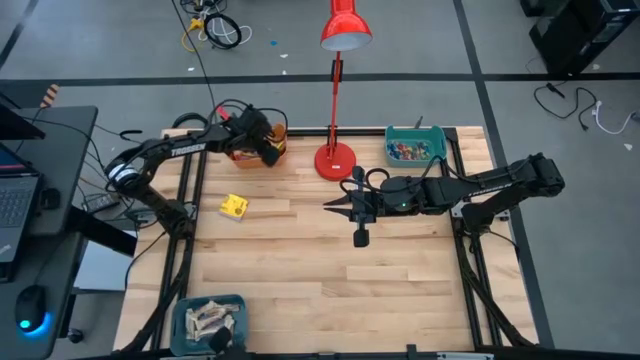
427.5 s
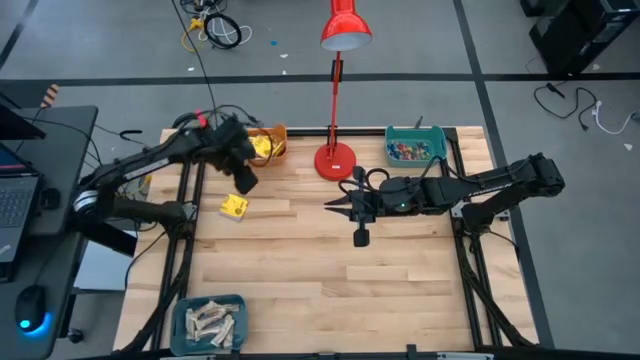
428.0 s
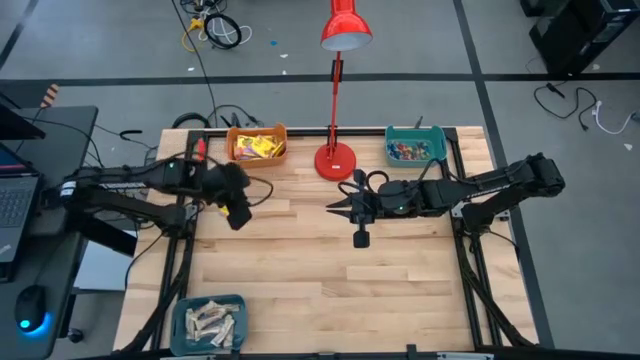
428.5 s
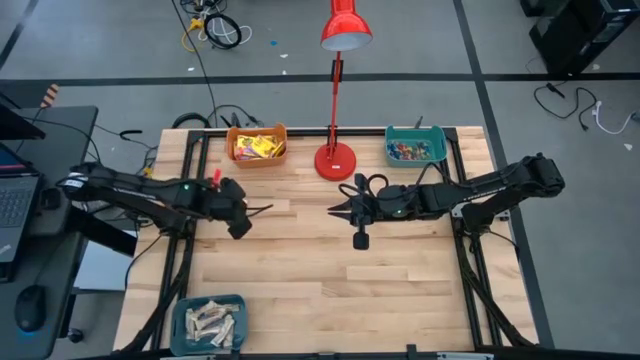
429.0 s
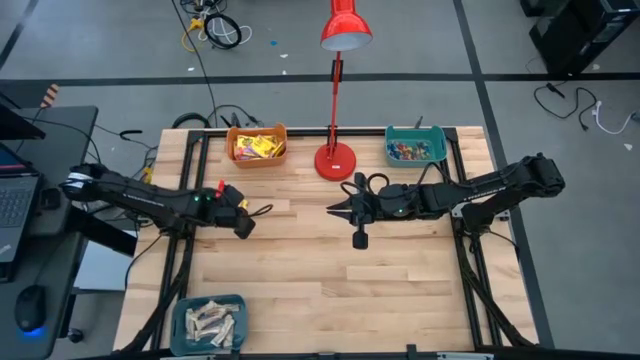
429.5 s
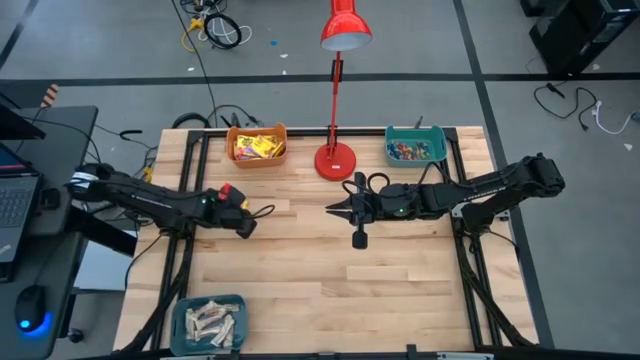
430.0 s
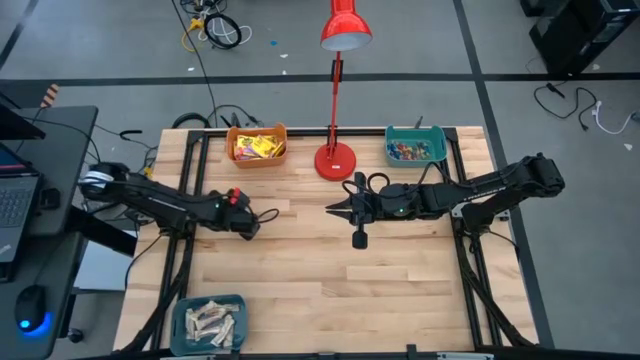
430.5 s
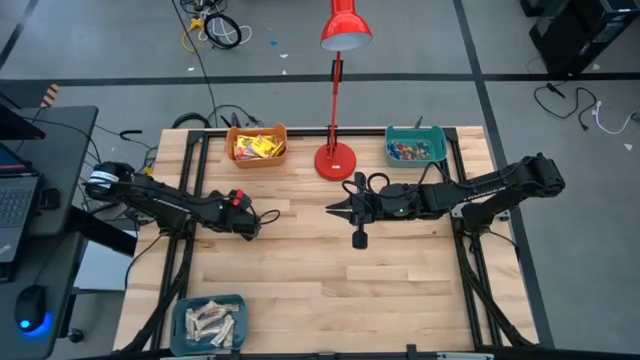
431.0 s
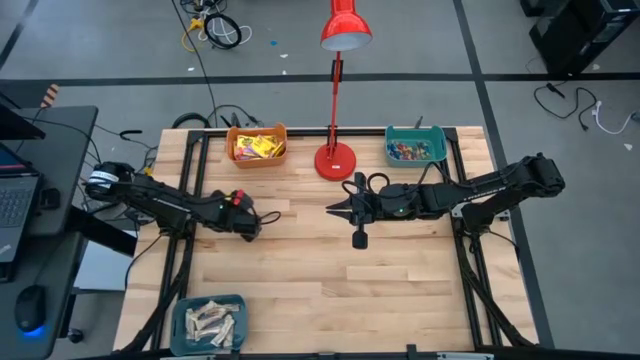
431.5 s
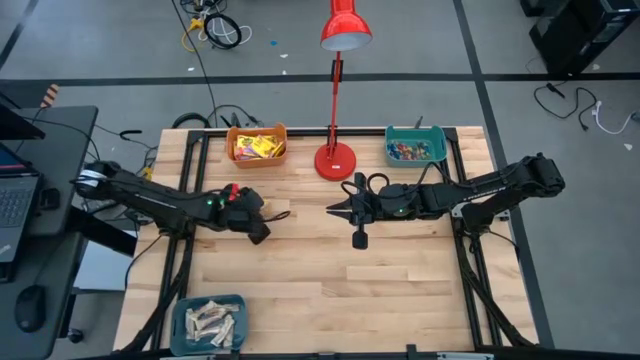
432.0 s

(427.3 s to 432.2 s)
Task: Sort candy
Put the yellow candy into the orange bin

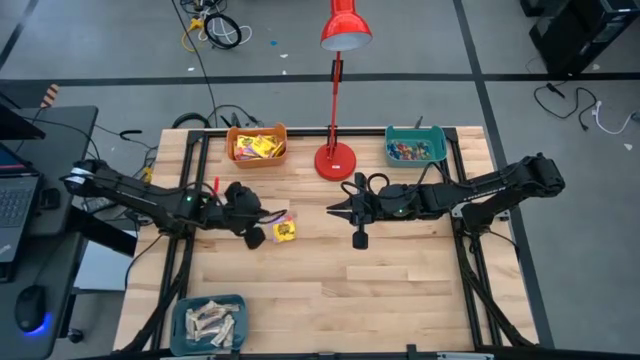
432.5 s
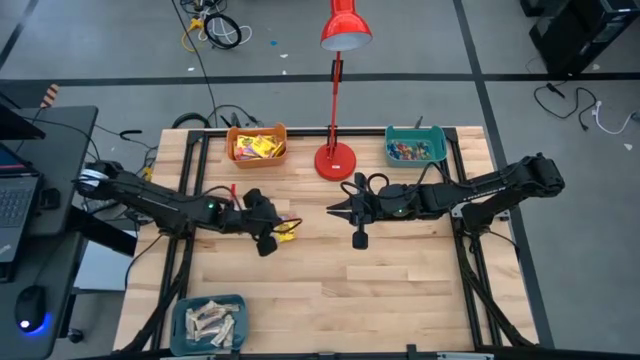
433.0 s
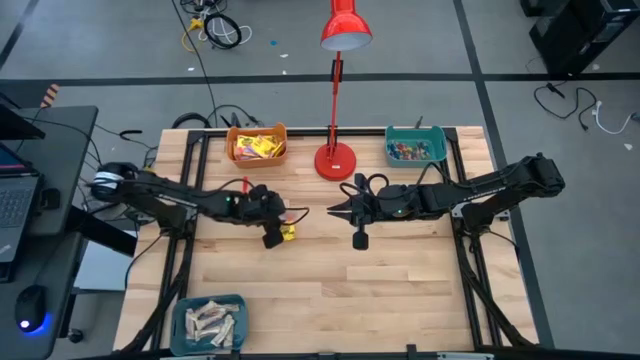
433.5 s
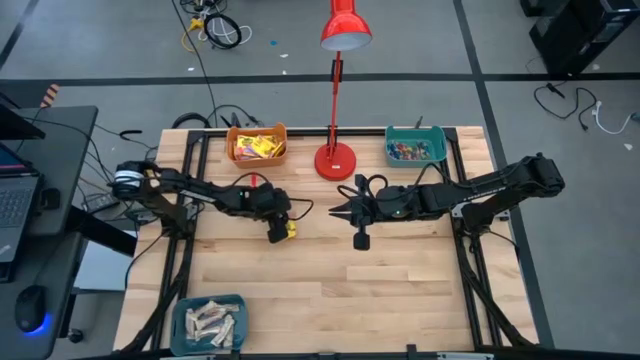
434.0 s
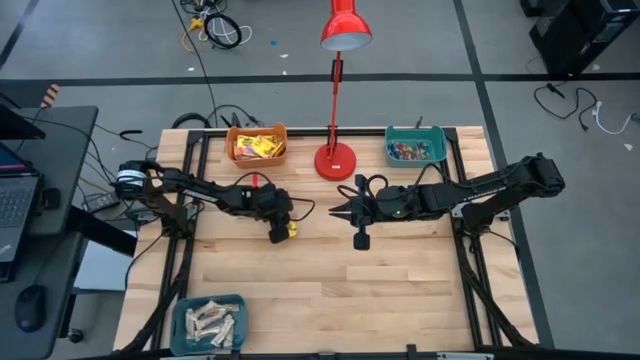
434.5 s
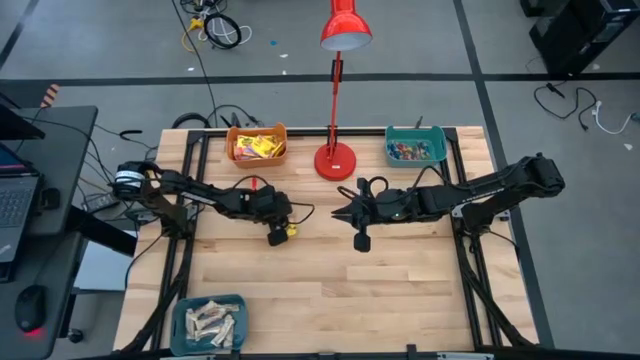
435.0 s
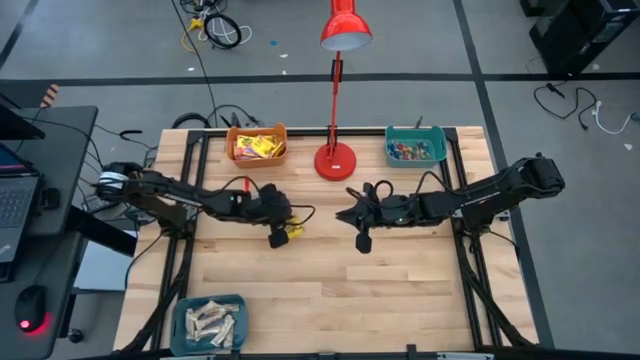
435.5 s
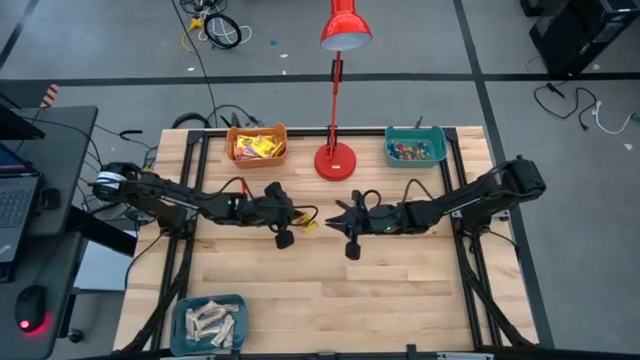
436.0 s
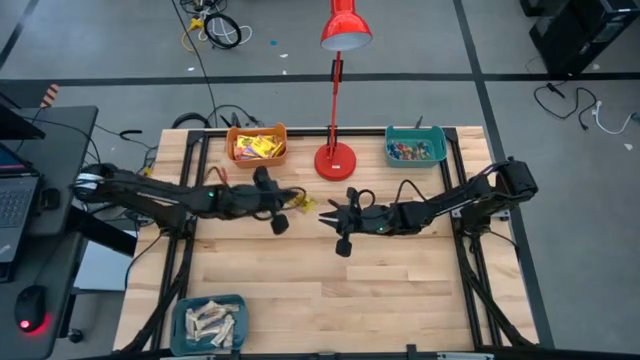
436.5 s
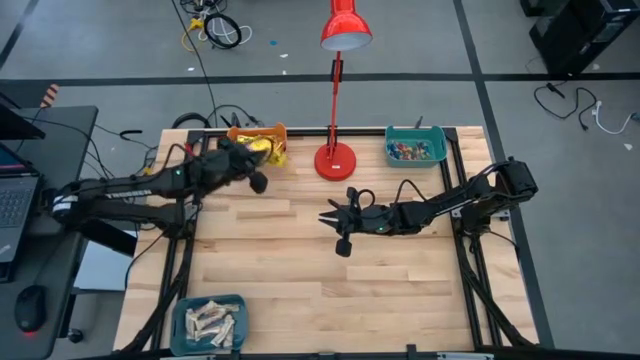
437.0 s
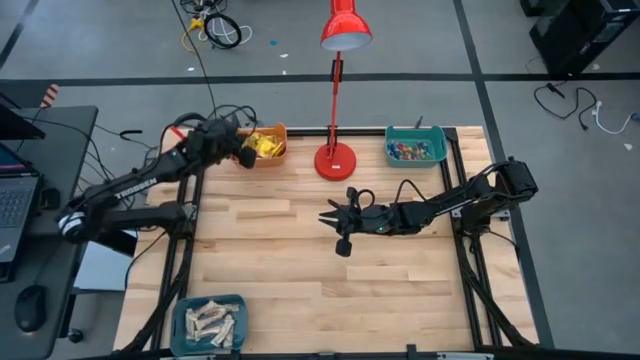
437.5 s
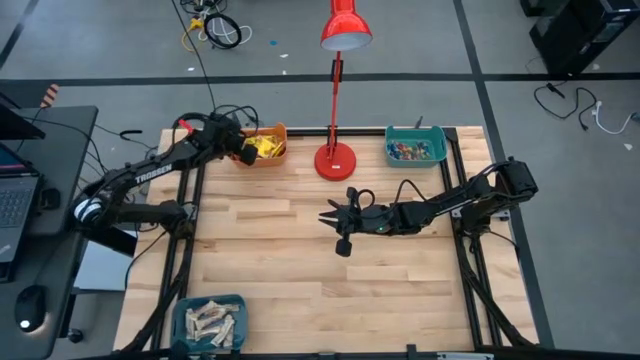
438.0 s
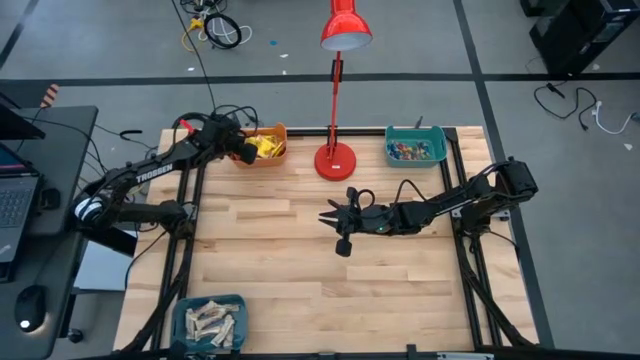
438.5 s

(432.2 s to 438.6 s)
Put the yellow candy into the orange bin

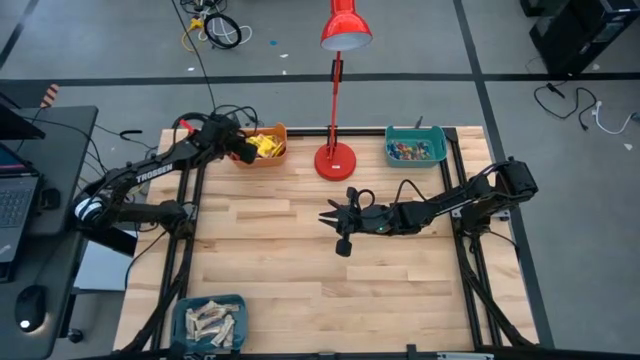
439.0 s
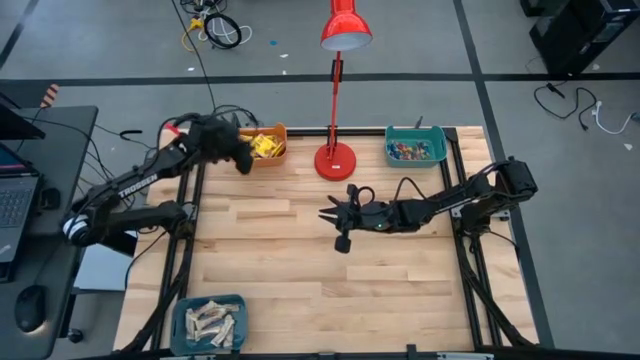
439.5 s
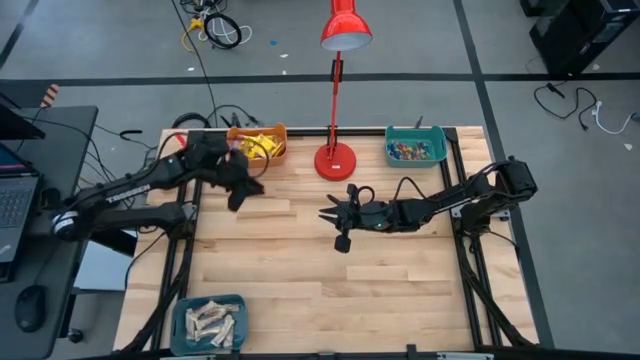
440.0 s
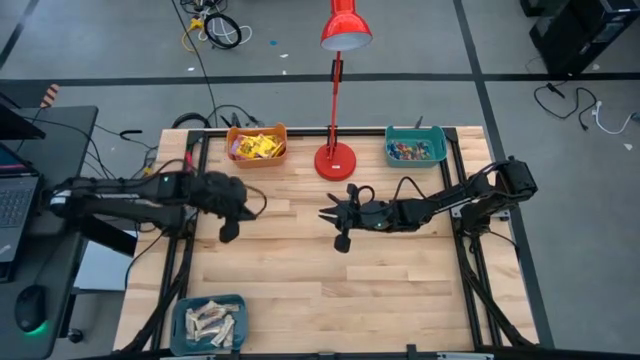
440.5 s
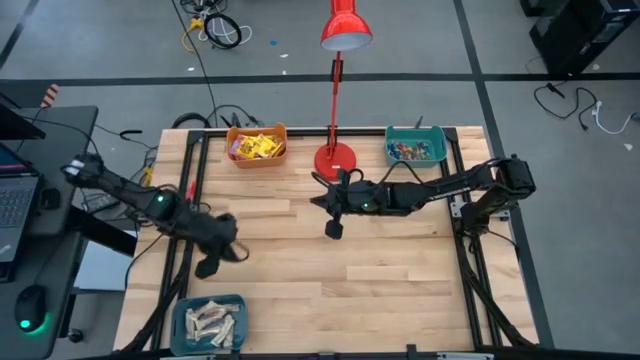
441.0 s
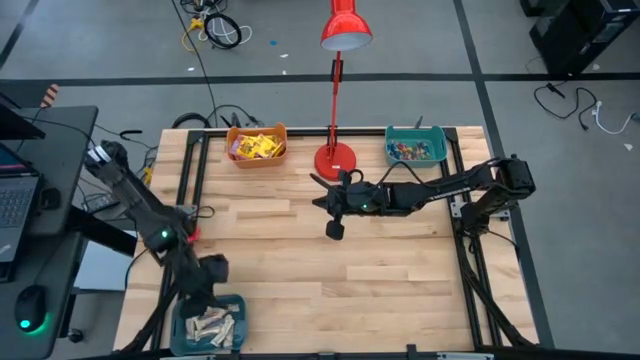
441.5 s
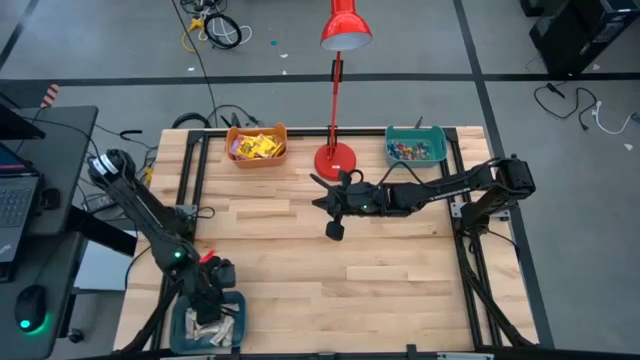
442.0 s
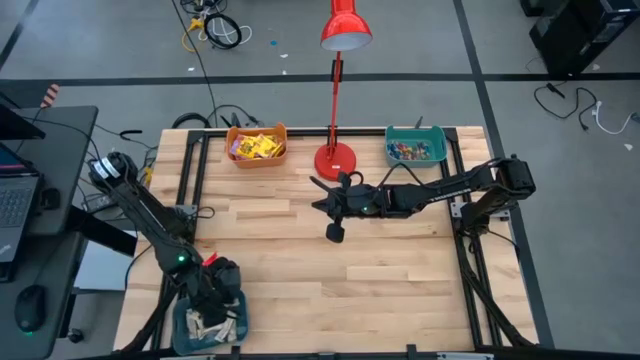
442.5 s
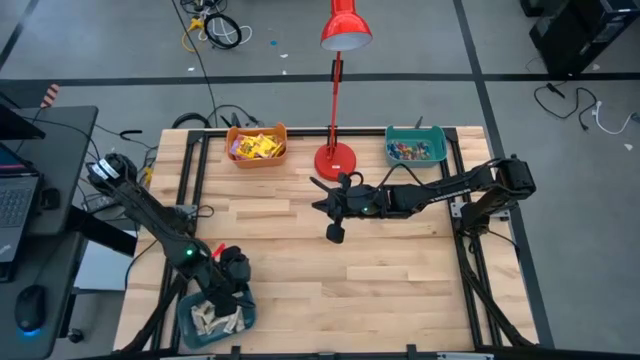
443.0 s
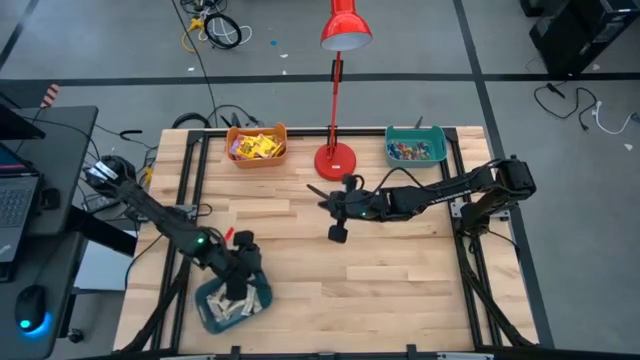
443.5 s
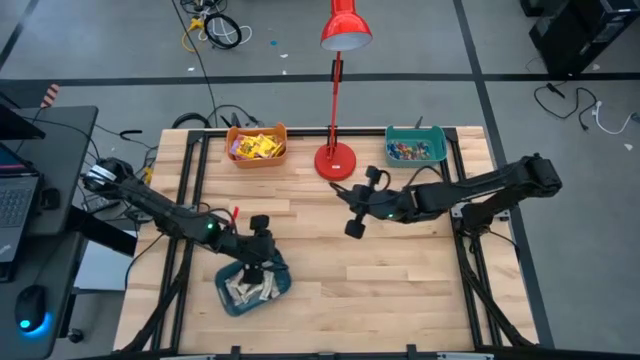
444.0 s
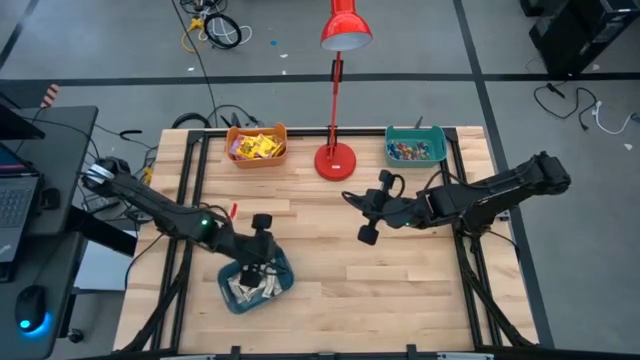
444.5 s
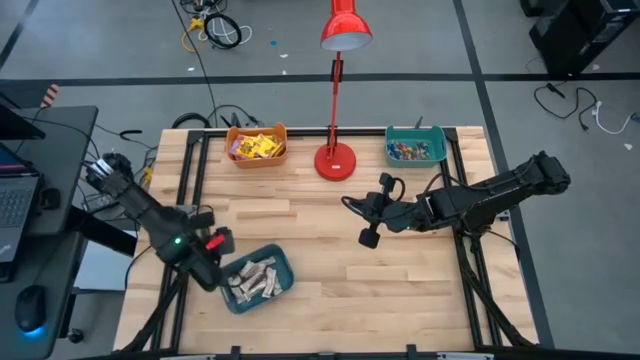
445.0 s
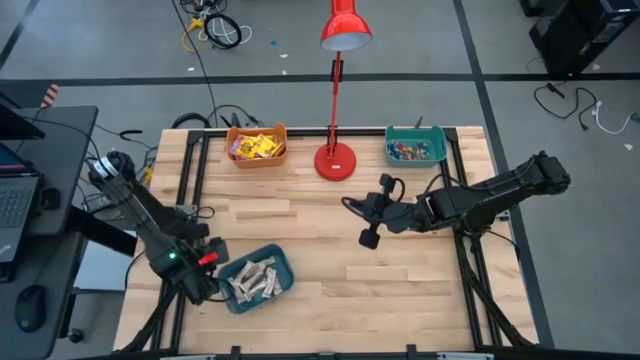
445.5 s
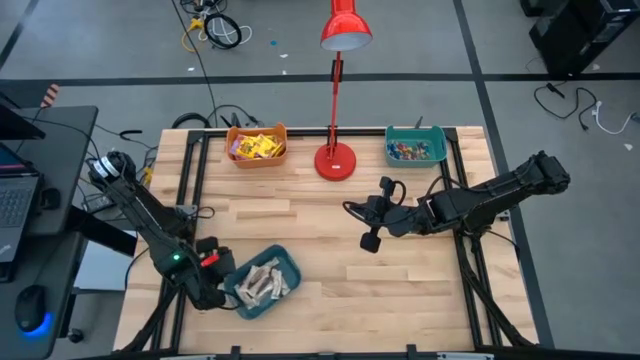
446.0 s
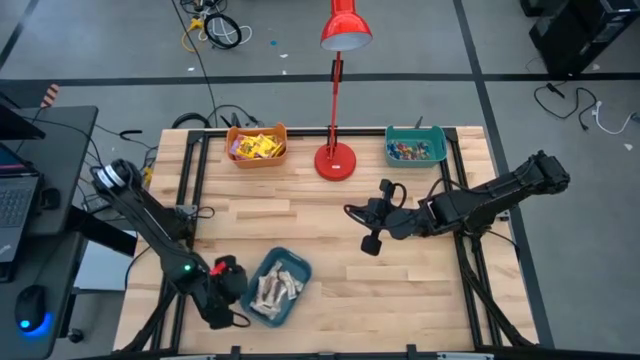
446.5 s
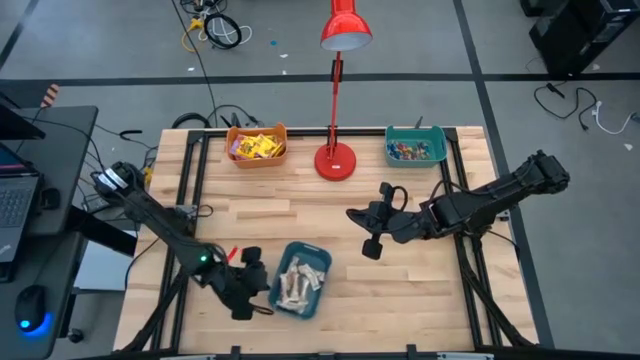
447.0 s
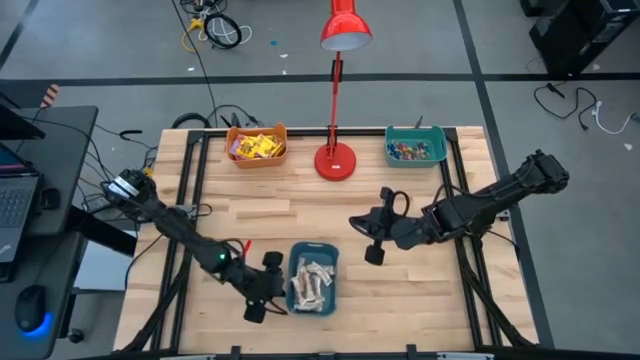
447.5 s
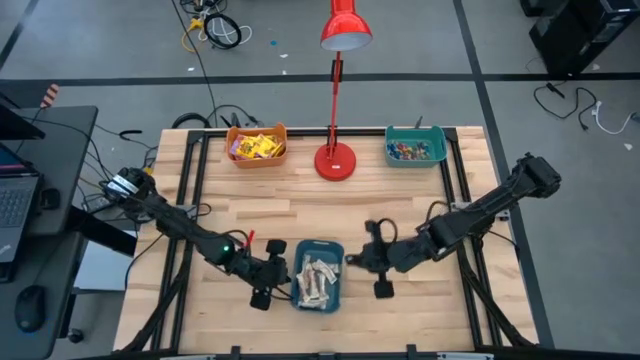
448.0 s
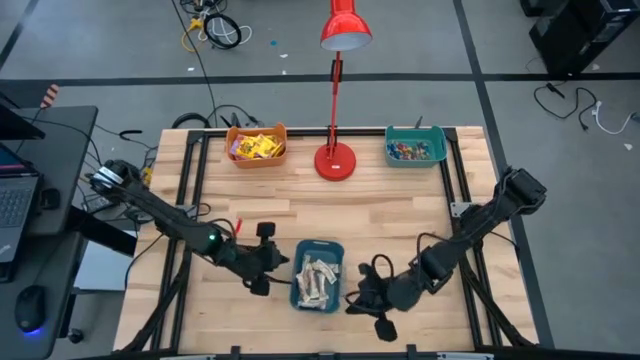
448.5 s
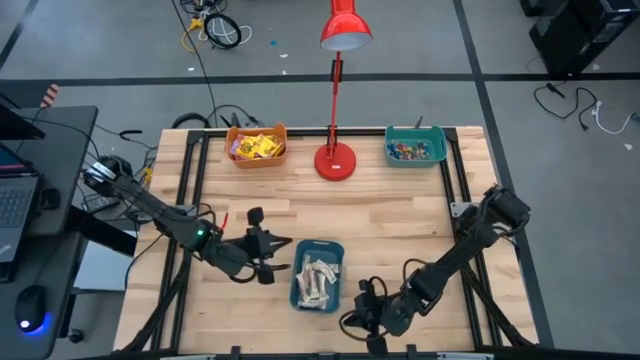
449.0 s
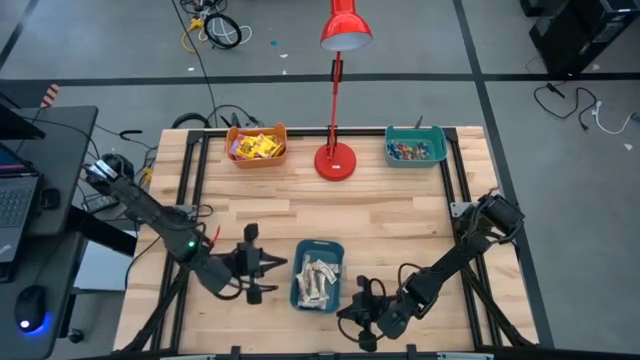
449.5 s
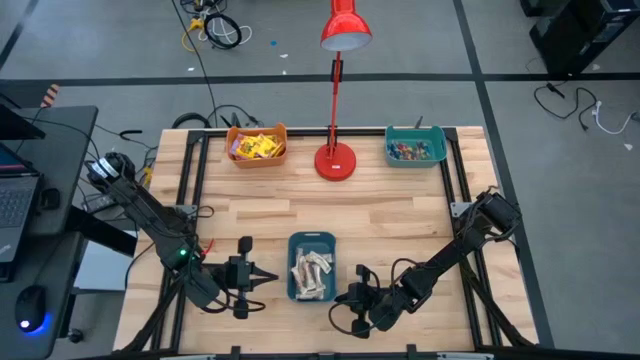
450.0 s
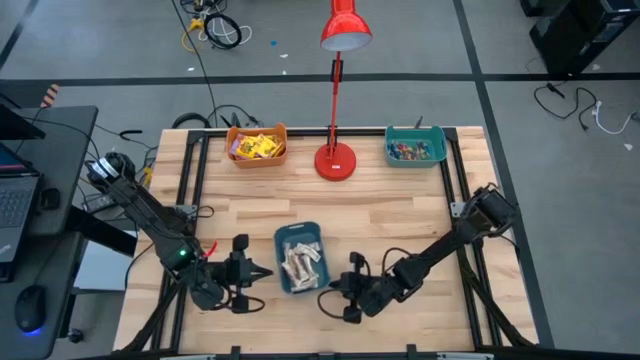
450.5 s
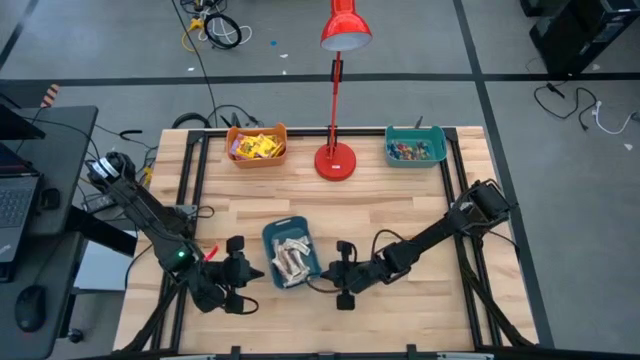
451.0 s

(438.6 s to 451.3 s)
Move the blue bin to the bottom left of the table
